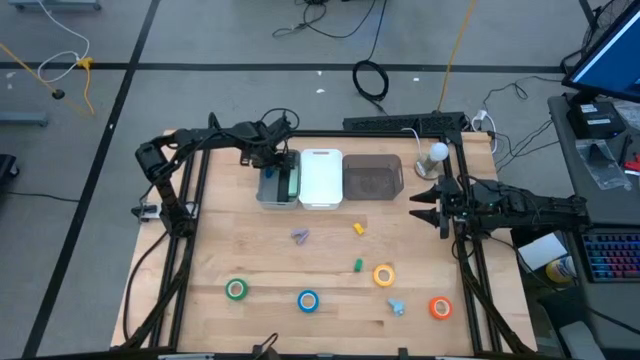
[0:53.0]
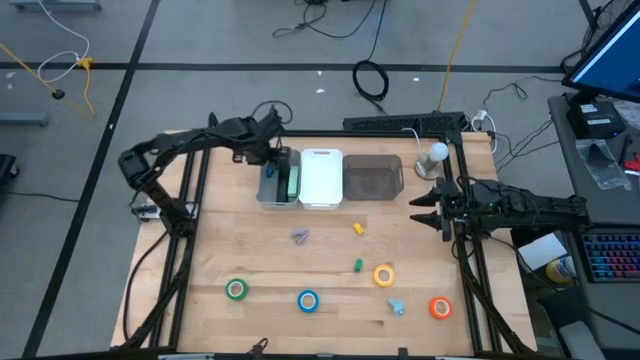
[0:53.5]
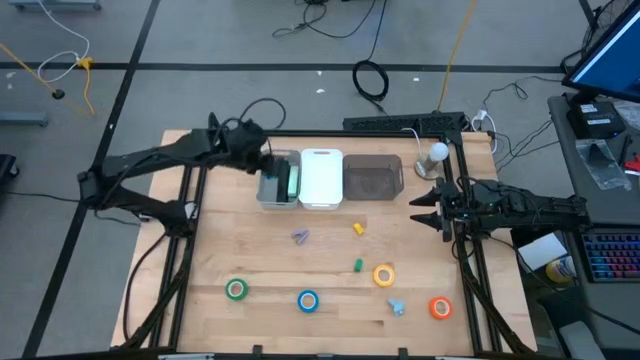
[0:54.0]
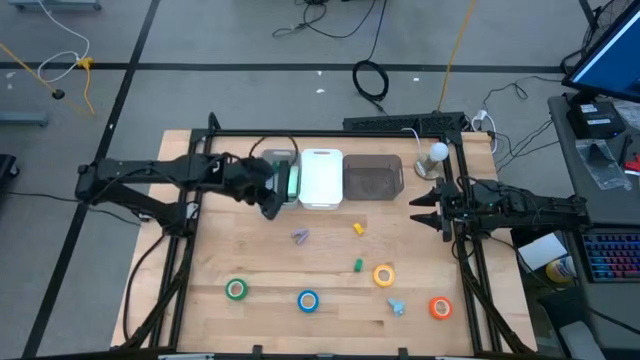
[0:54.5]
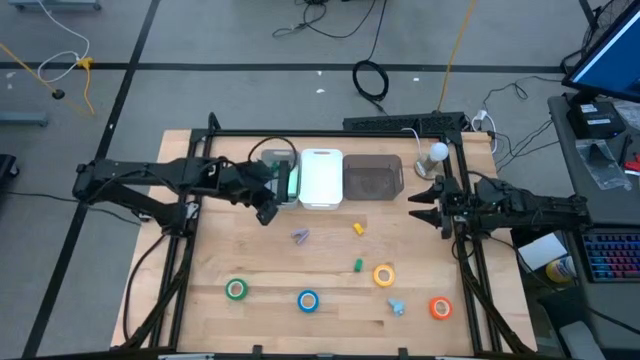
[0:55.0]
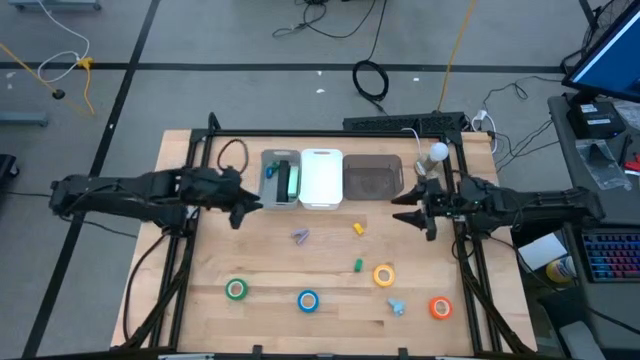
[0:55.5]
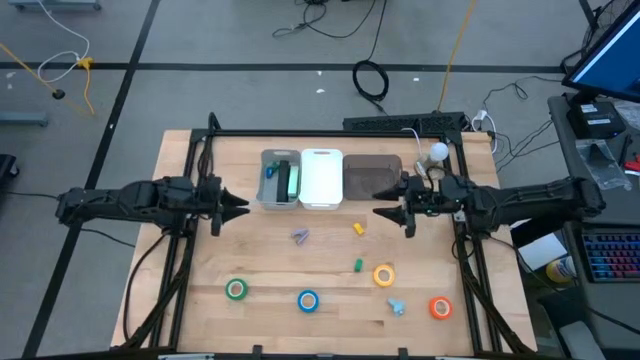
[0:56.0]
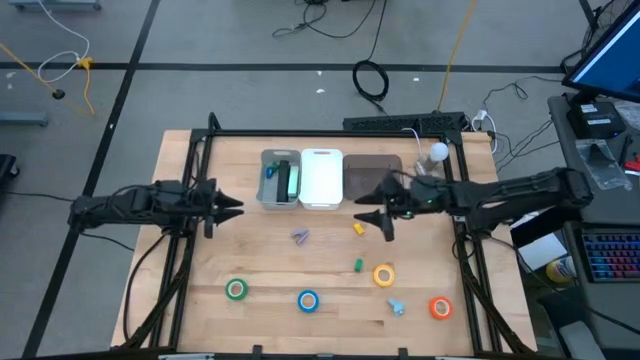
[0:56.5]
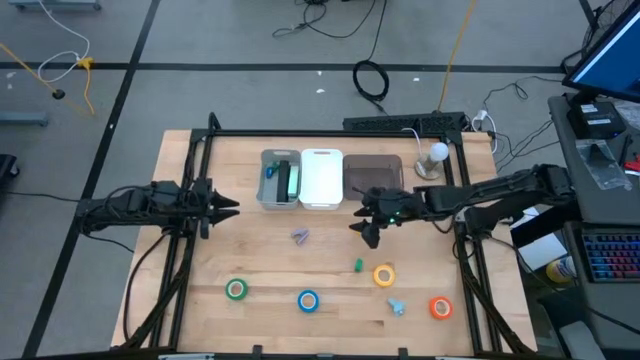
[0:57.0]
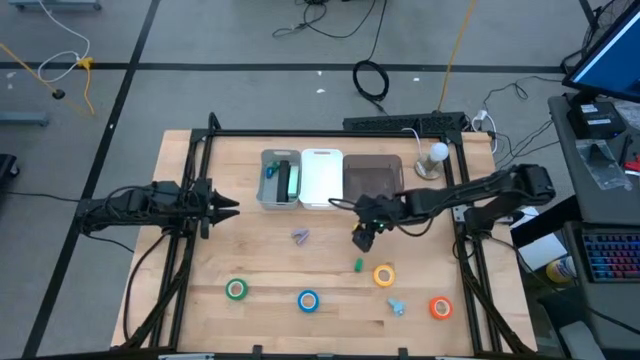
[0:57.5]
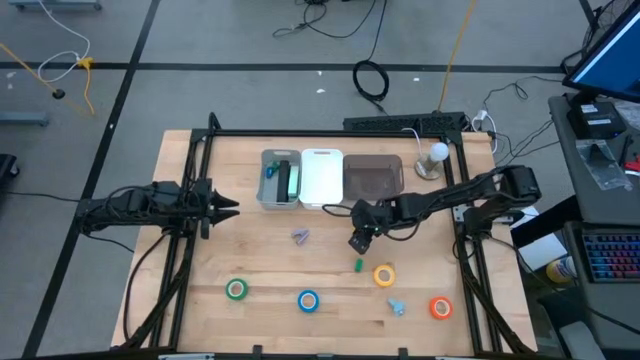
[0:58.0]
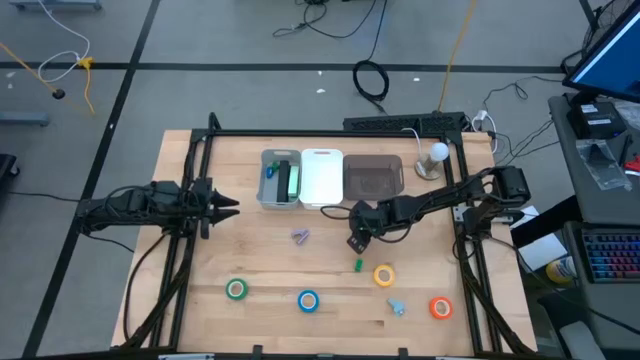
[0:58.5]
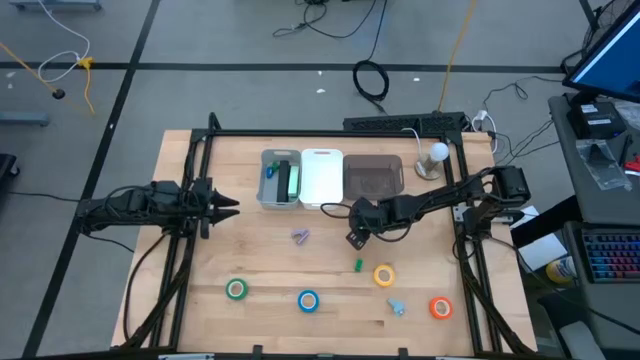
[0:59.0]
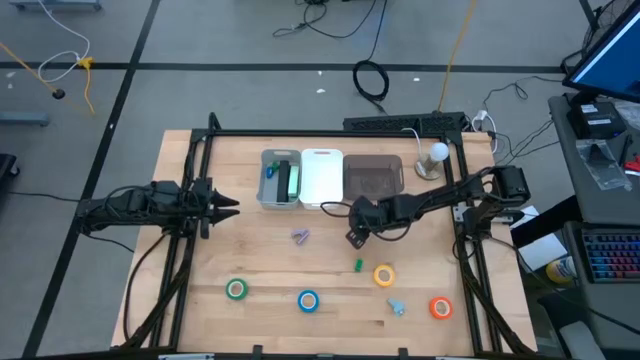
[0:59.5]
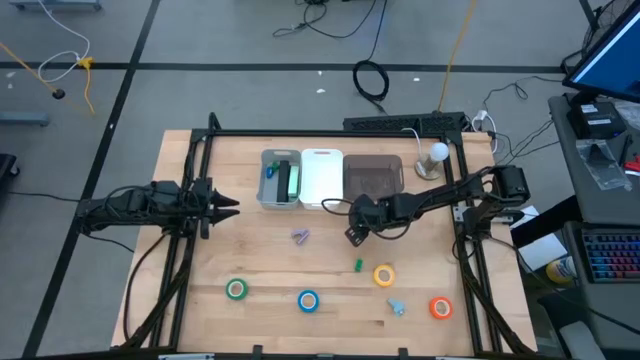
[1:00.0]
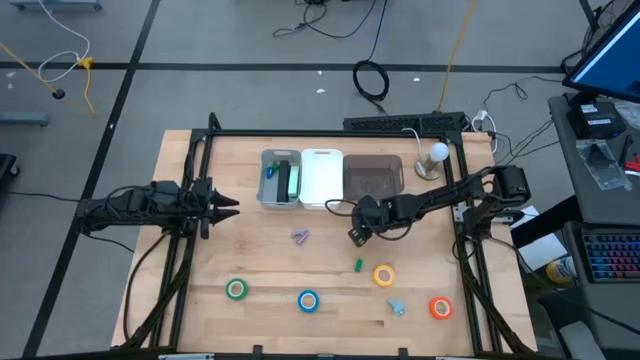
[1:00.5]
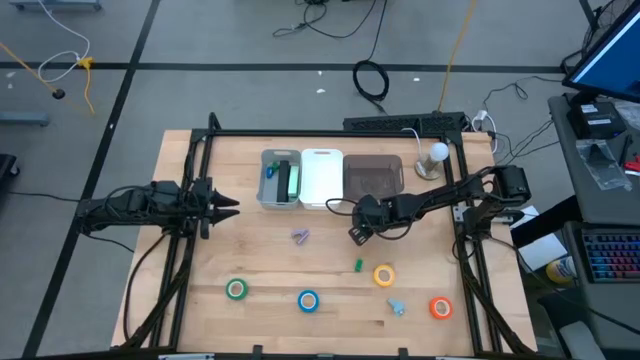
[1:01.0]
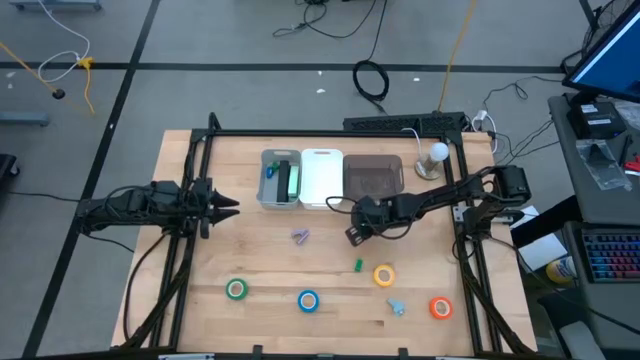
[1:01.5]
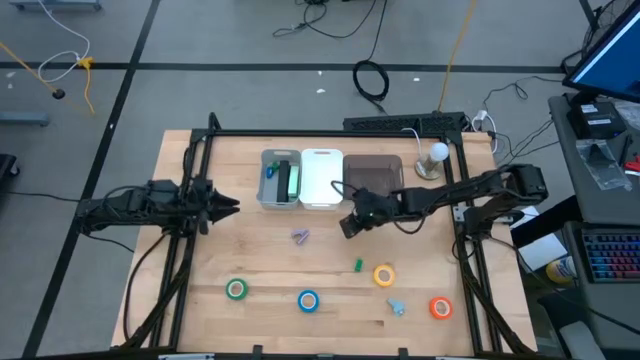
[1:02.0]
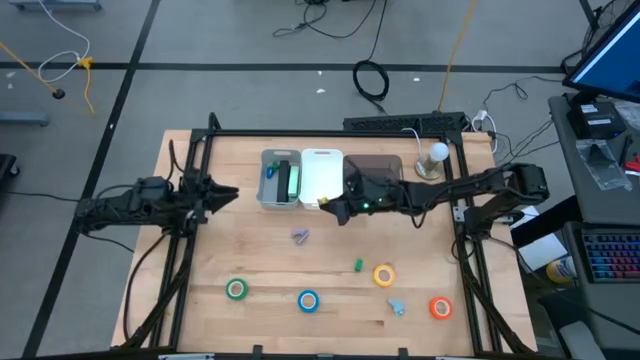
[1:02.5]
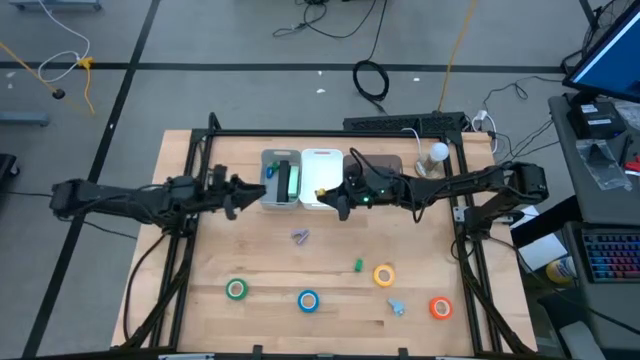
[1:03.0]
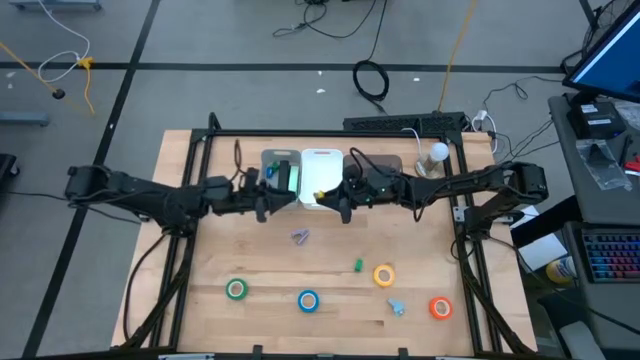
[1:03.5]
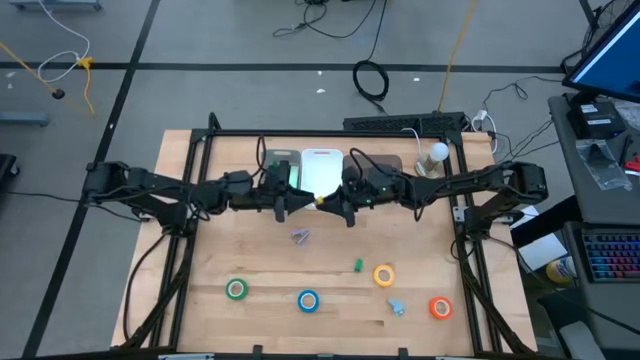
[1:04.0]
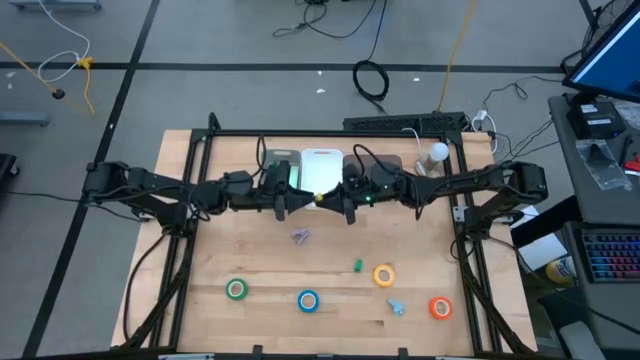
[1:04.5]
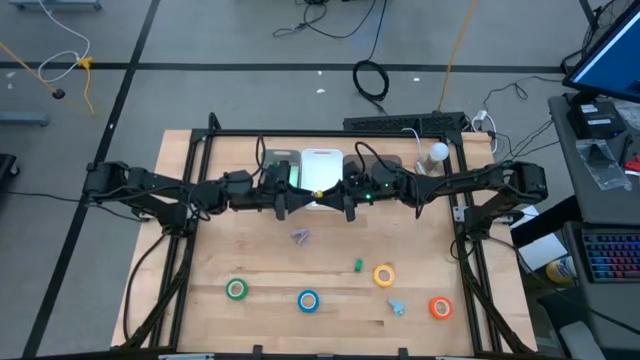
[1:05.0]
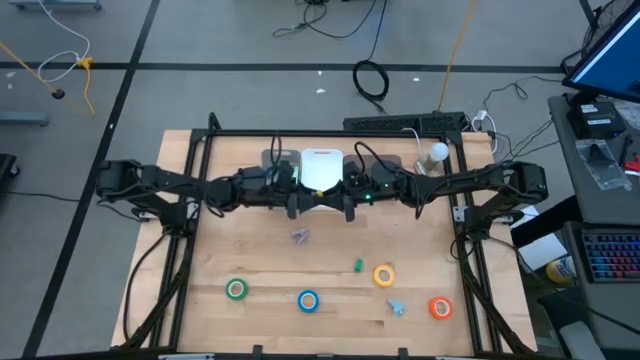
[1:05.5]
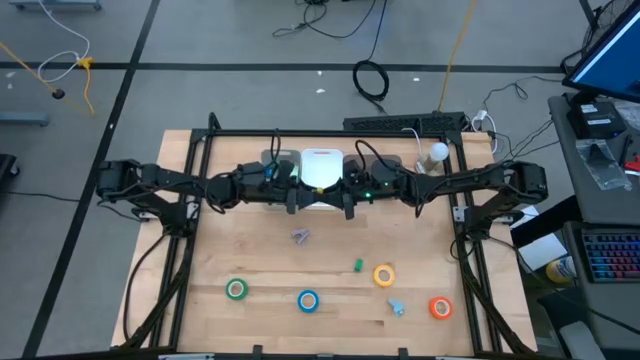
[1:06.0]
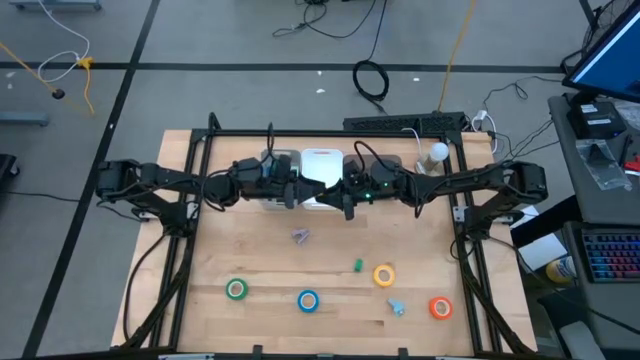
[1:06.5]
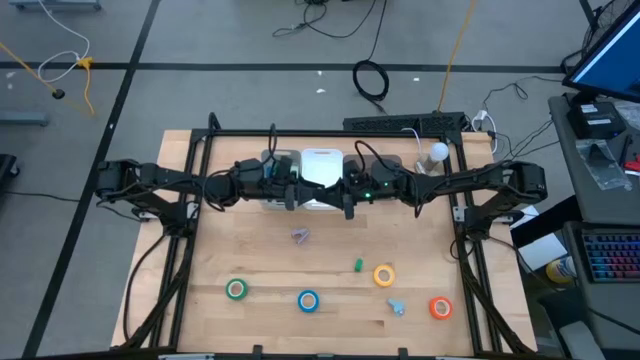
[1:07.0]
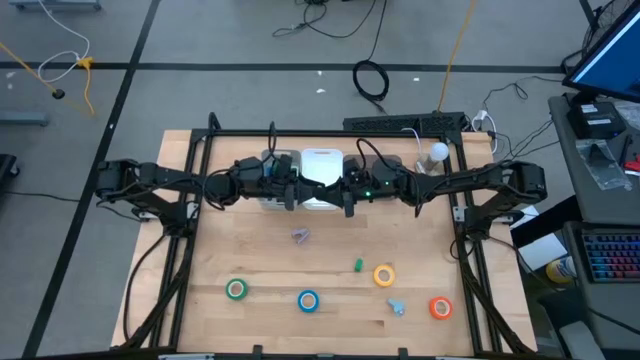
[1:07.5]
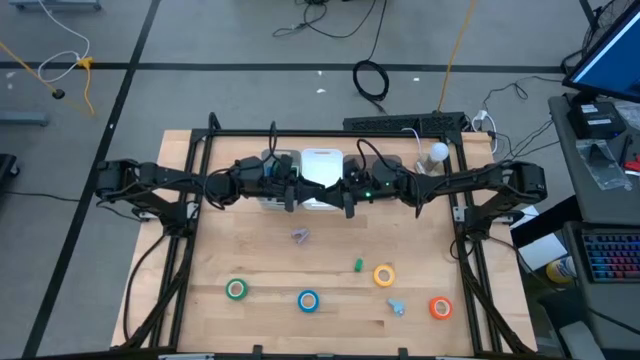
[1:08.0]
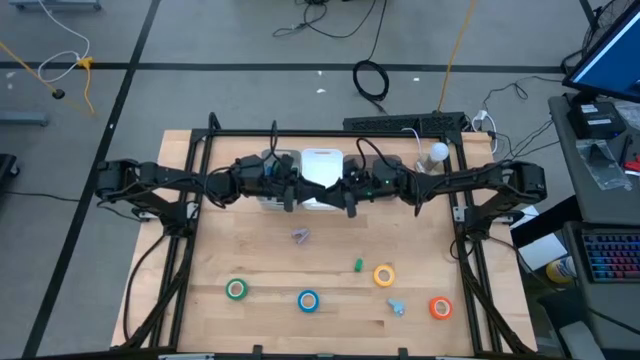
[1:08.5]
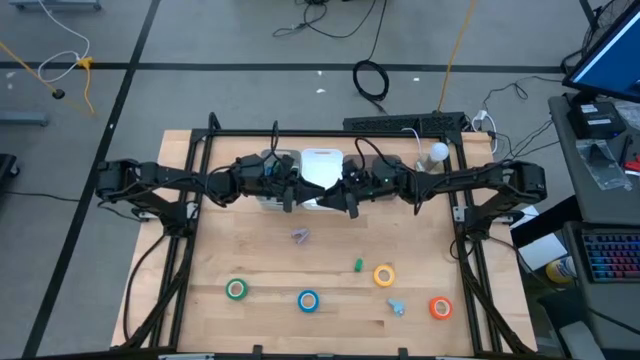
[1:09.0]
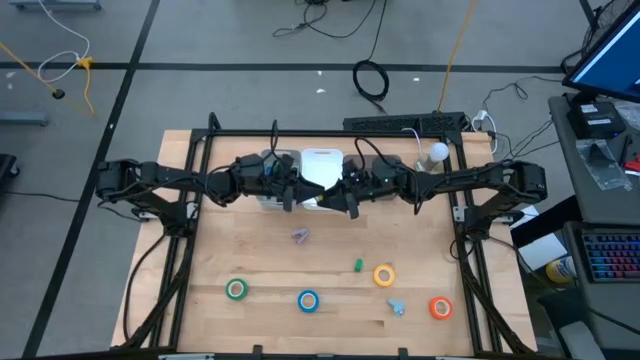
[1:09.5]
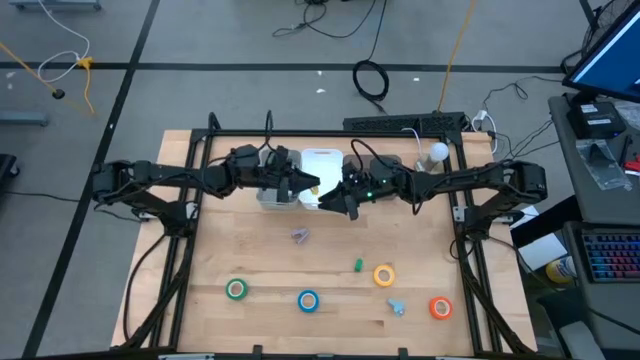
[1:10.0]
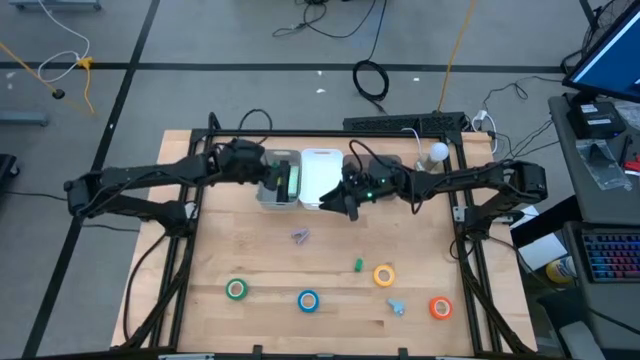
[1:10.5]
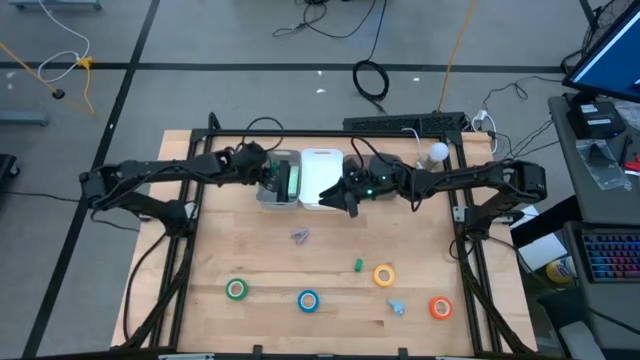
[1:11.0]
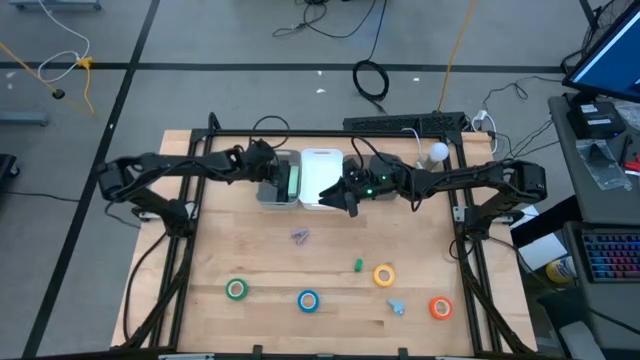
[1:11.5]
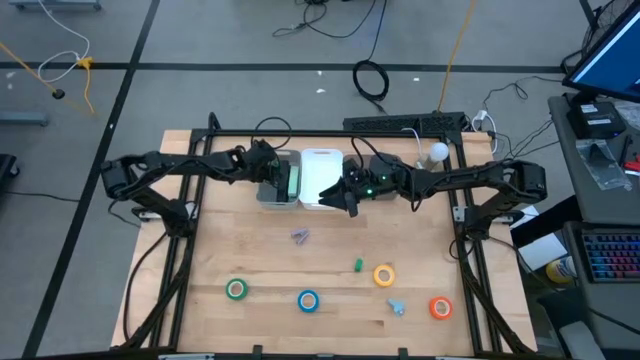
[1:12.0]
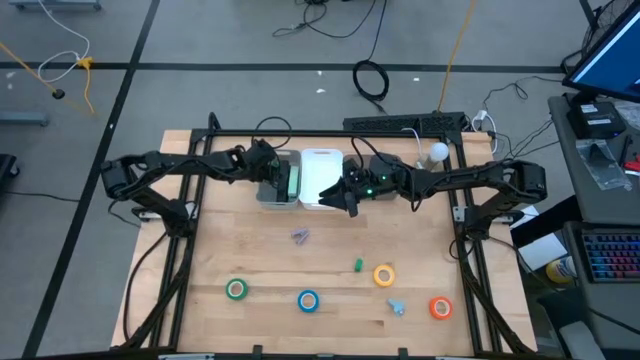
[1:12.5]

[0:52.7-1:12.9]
Task: Pick and place Stapler, Stapler remover, tape
Put the yellow stapler into the gray bin

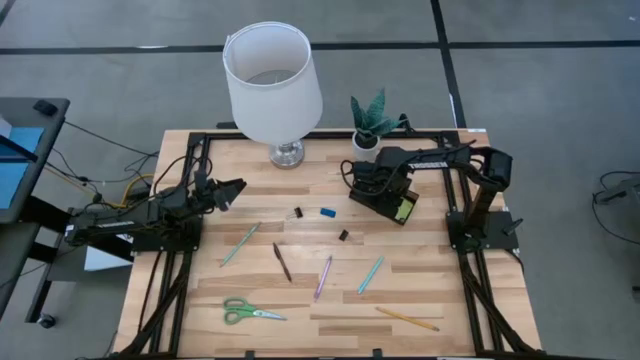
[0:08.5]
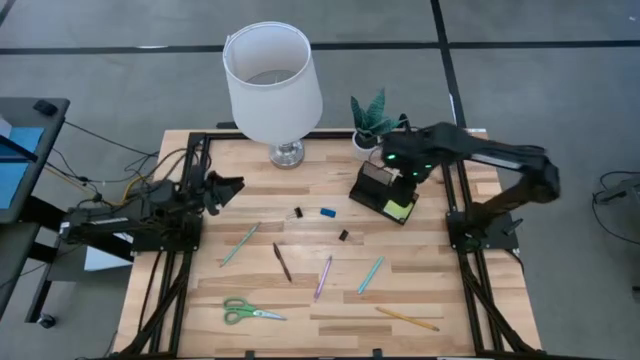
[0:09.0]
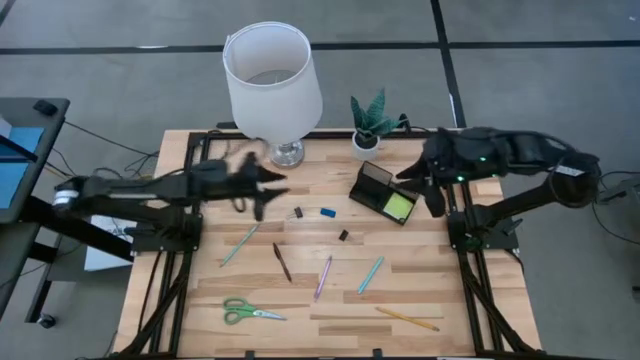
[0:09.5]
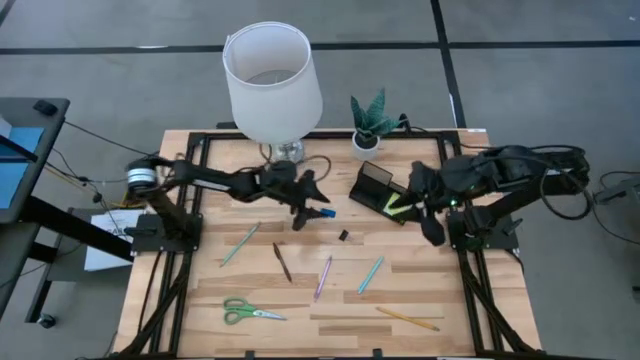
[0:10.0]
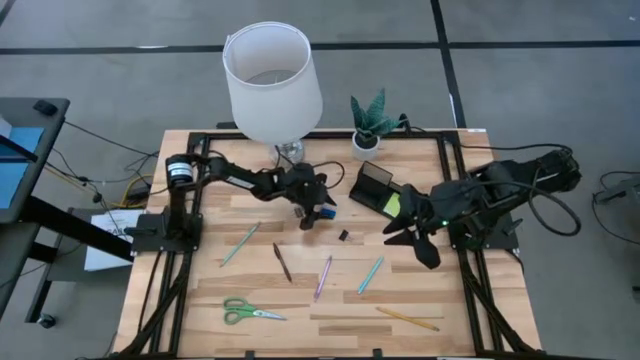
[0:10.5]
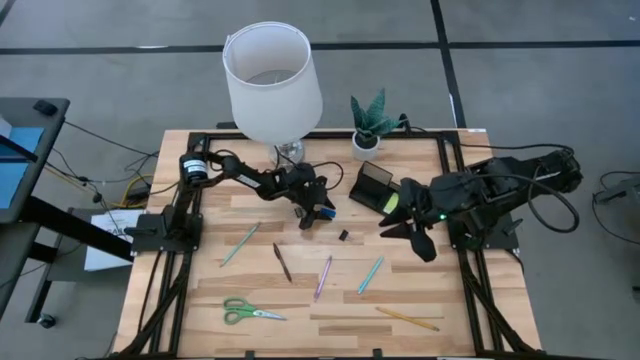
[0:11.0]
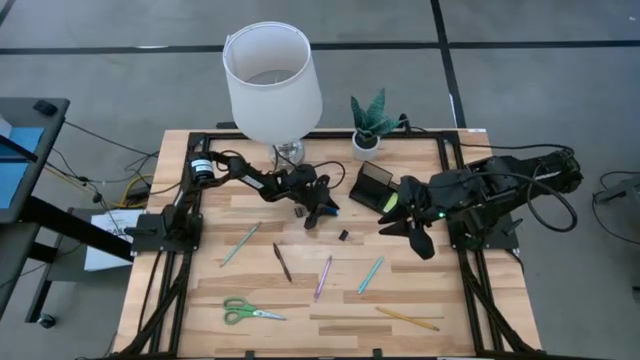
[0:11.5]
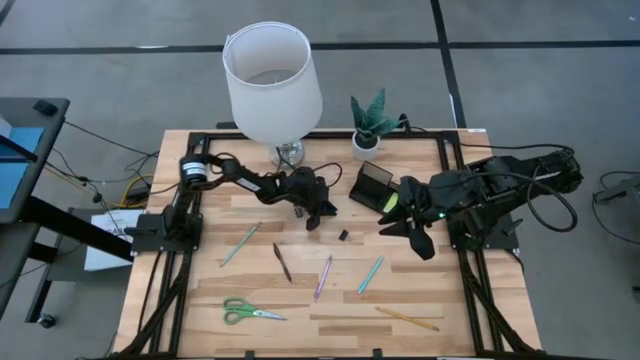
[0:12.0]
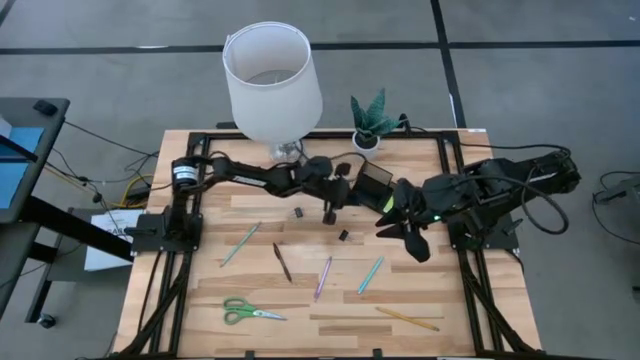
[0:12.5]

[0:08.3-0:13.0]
Task: Pick and place office supplies into organizer
Put the blue eraser into the black organizer
